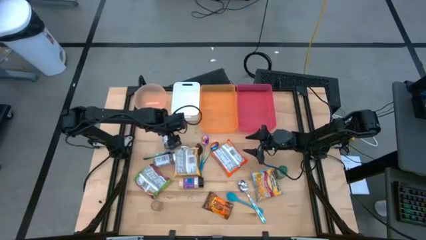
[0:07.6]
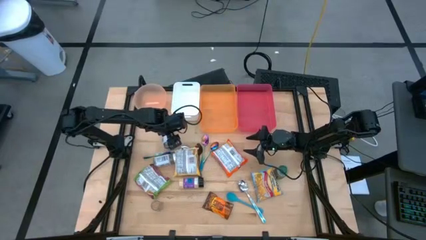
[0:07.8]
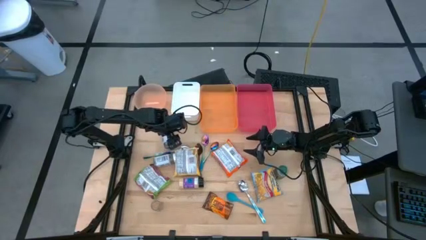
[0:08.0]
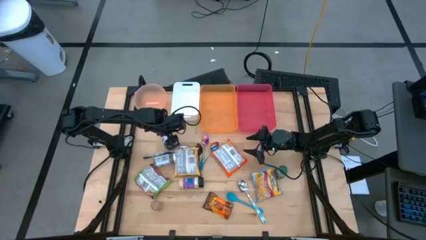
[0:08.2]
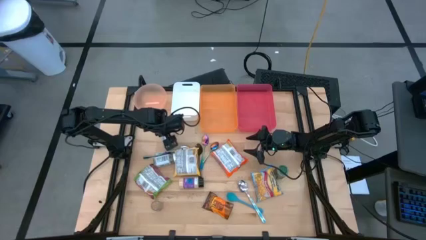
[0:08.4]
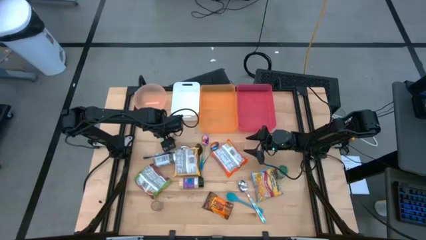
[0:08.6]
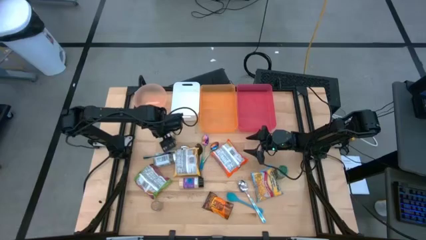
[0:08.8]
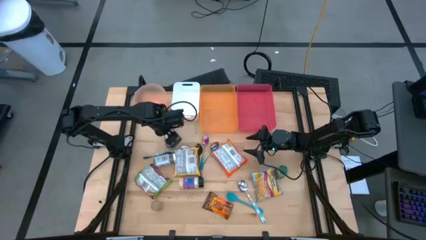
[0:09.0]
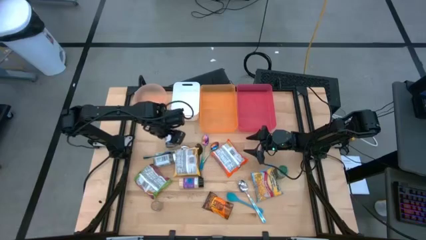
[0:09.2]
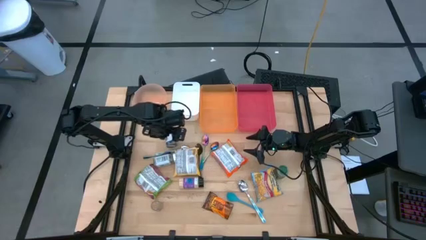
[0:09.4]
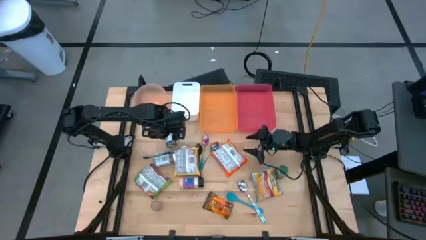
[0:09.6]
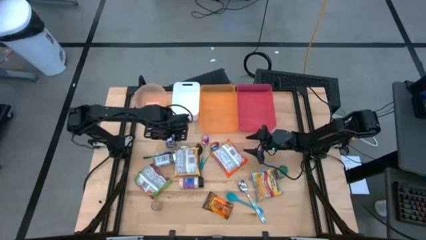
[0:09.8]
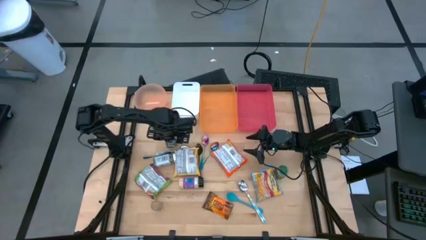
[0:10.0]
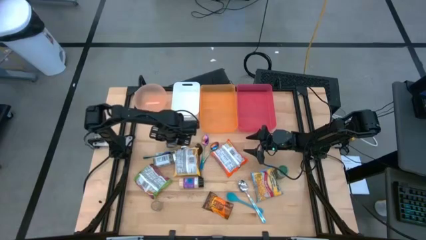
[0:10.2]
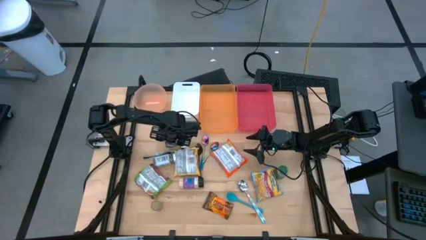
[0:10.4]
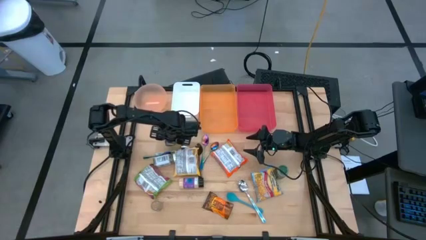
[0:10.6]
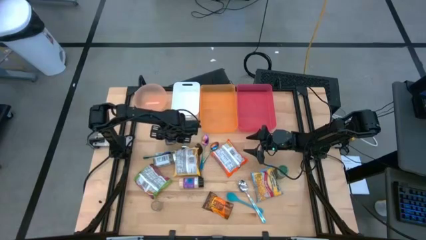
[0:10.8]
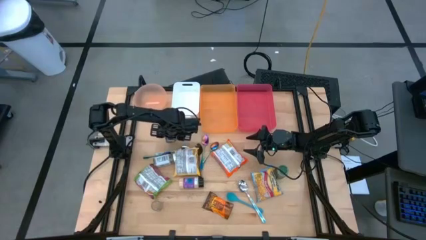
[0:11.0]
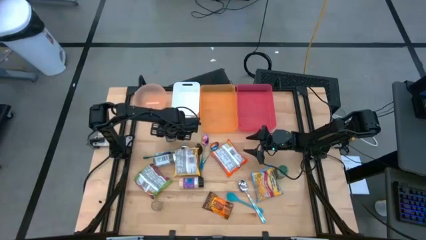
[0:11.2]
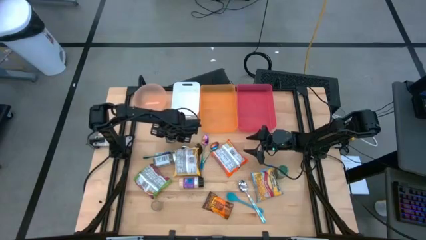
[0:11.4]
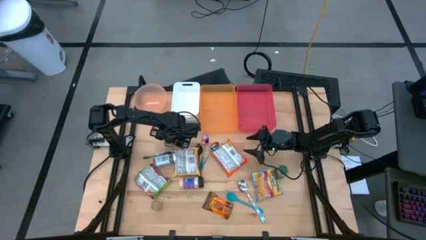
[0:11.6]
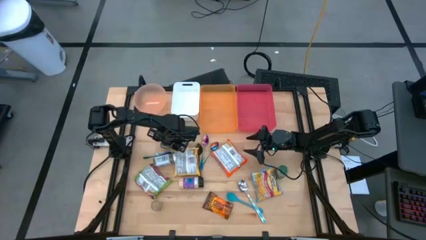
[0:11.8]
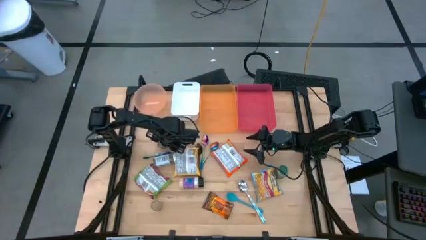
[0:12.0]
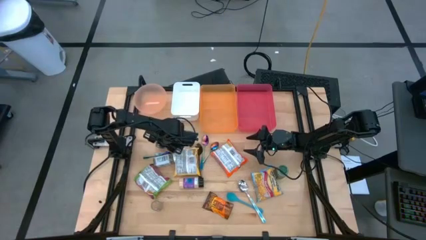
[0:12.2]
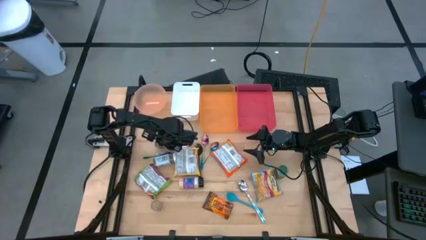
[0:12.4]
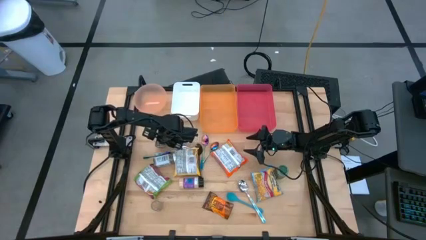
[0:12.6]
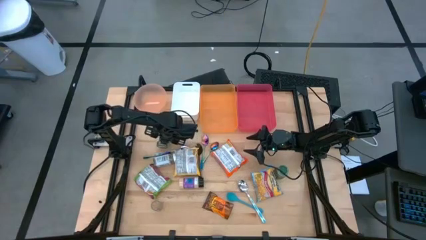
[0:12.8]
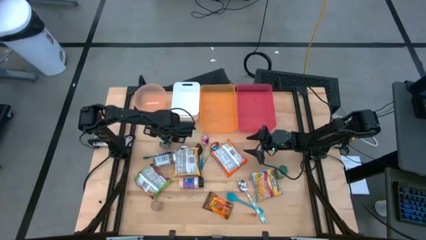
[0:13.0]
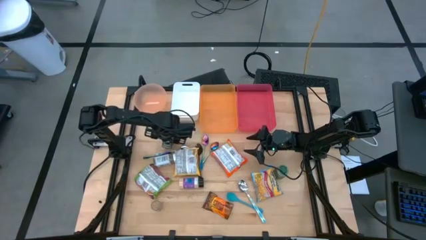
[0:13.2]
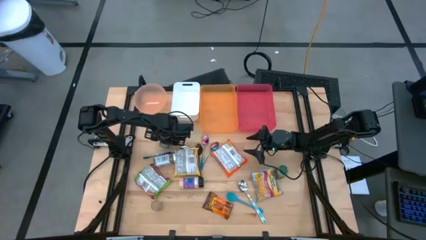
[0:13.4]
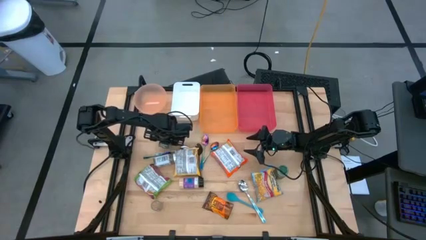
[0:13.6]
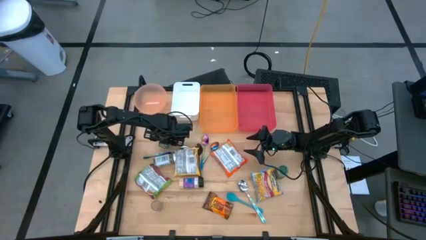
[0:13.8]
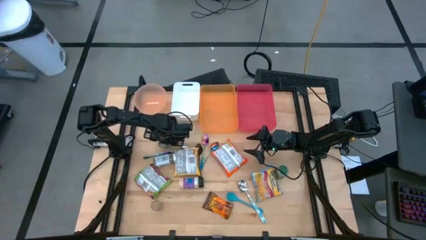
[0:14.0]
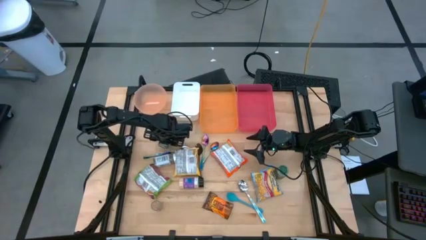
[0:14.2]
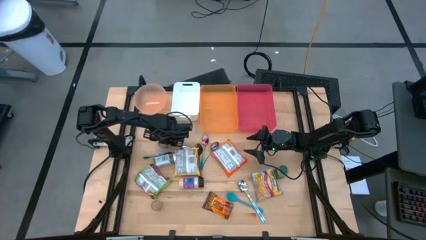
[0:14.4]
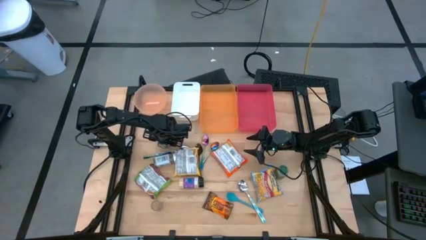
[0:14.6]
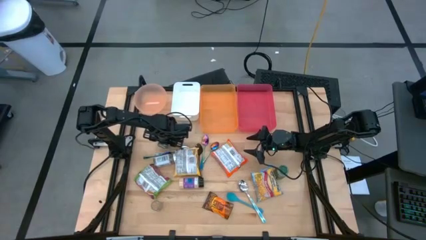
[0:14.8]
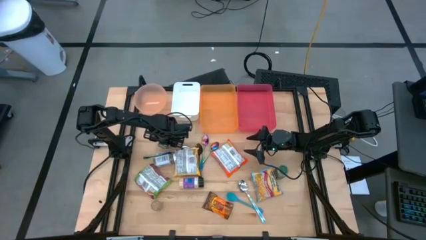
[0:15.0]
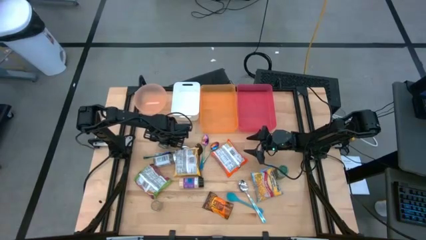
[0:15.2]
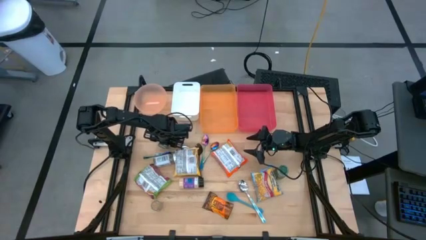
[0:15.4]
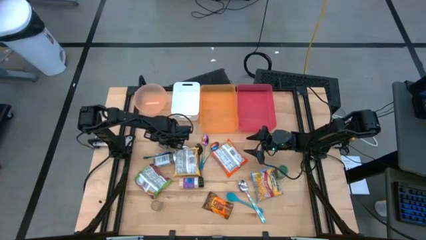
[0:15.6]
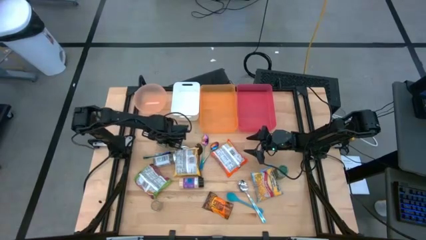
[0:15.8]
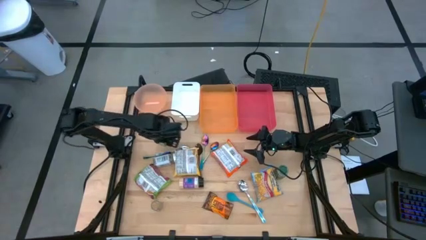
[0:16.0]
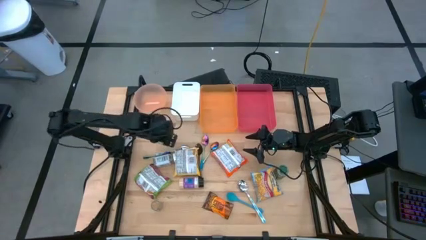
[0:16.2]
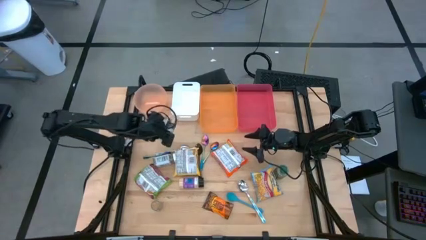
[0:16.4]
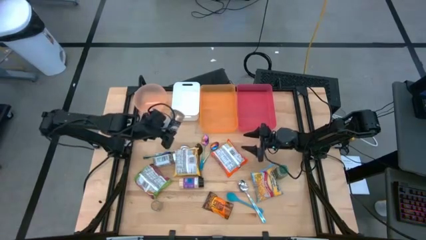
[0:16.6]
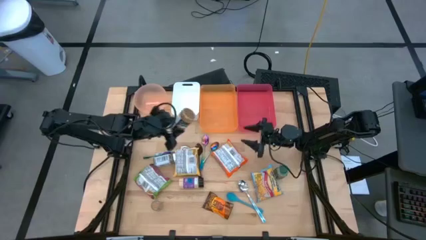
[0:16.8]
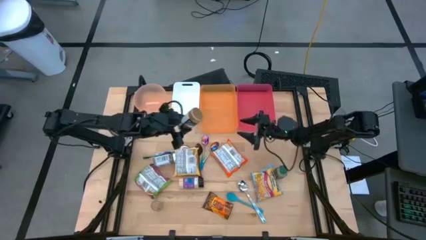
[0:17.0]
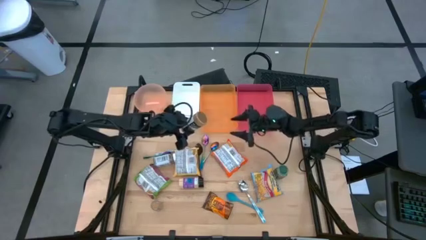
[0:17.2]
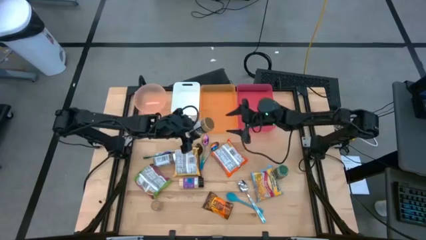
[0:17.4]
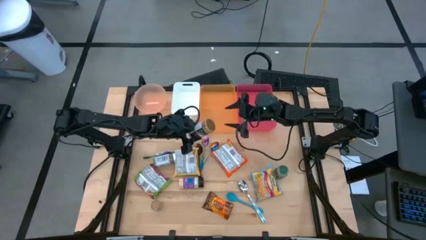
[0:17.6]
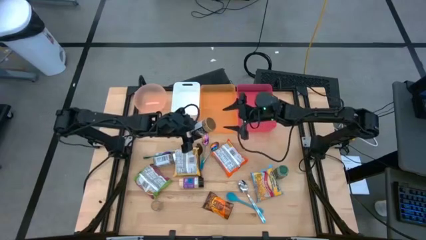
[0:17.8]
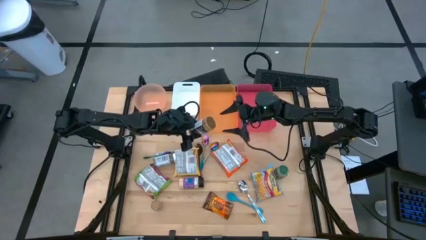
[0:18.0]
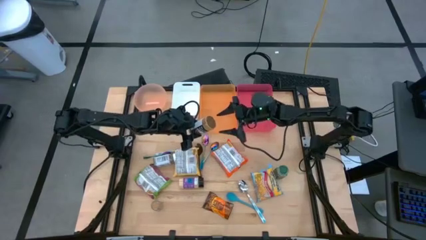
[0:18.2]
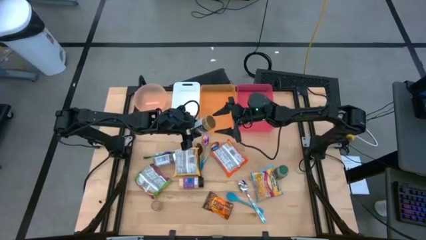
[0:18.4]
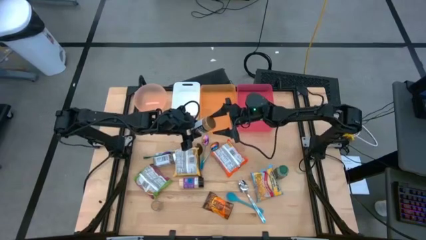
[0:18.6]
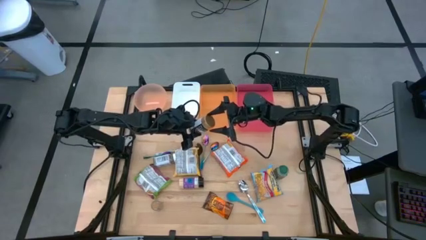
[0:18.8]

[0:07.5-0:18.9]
Task: Pick & Place Food Item
Put the golden seasoning bottle into the red bin
